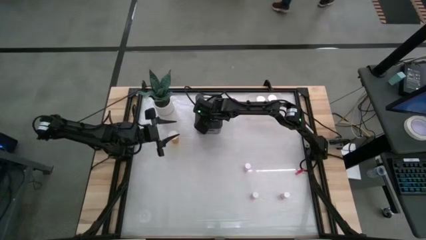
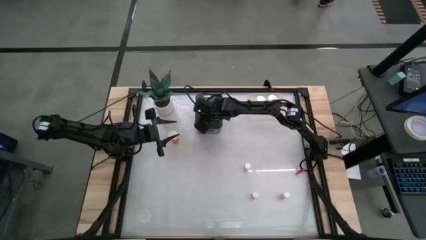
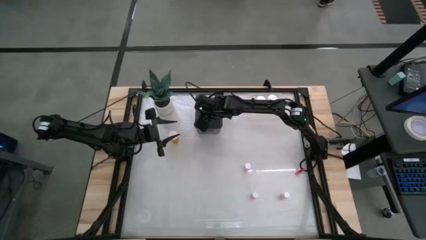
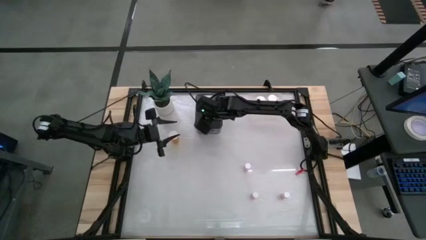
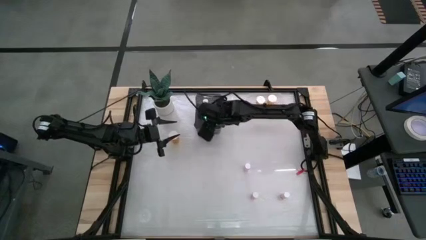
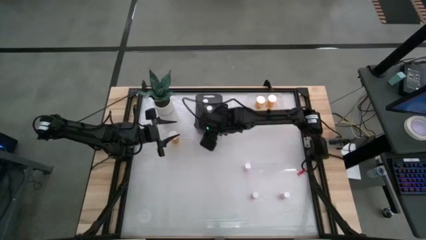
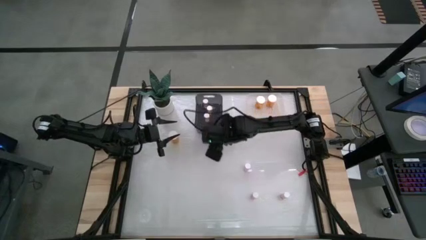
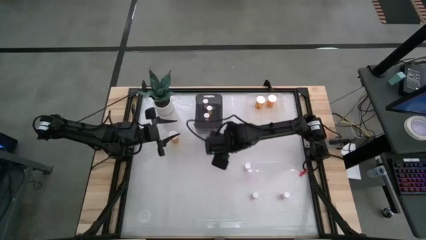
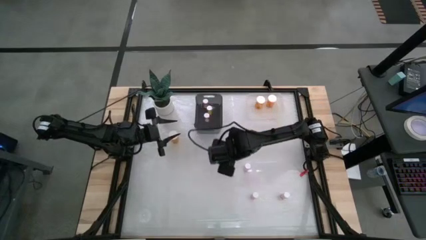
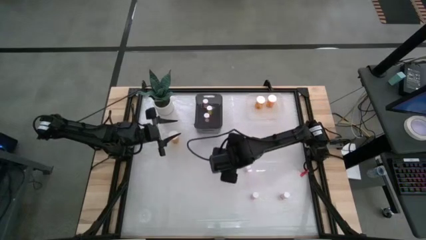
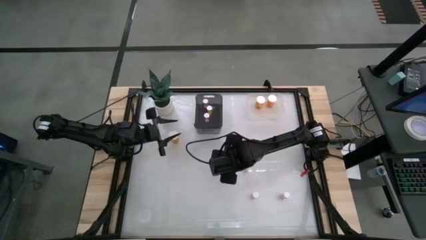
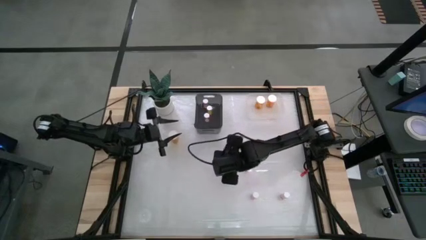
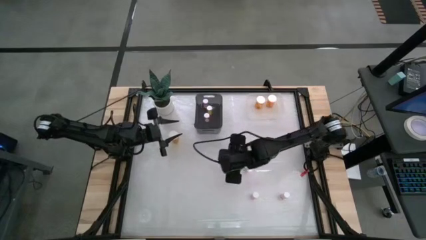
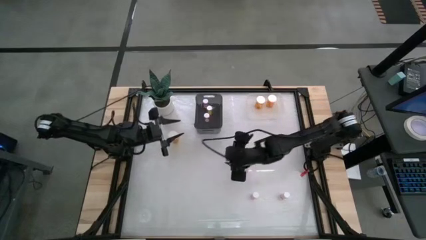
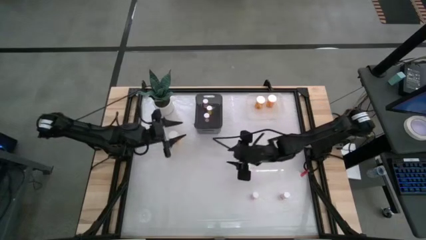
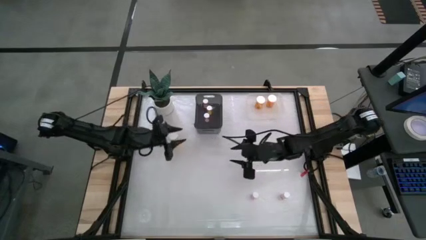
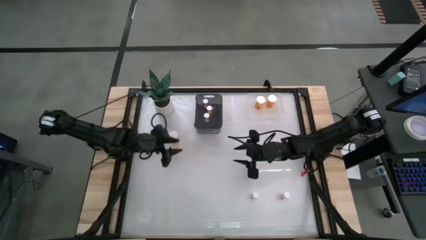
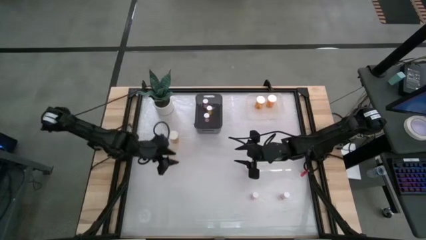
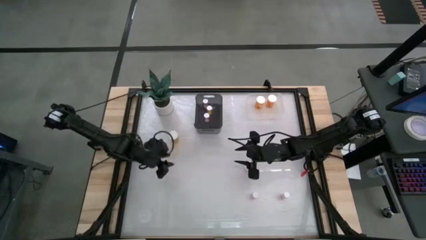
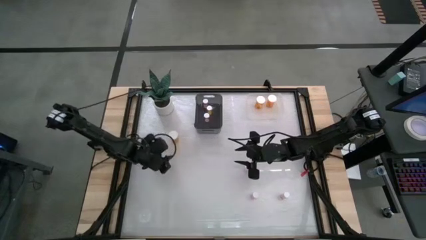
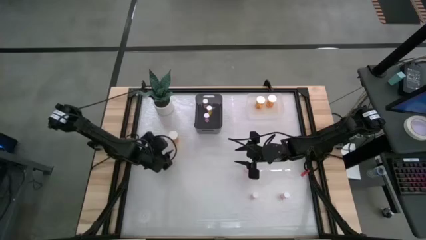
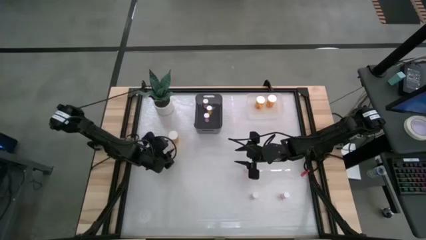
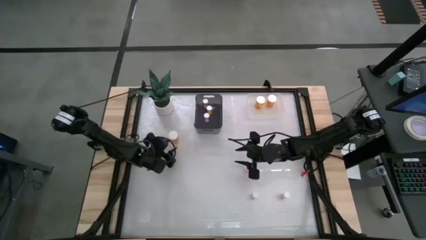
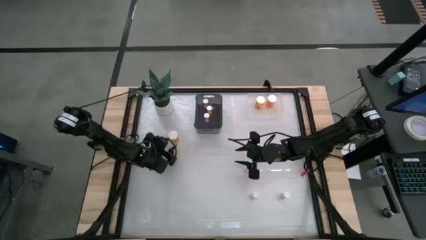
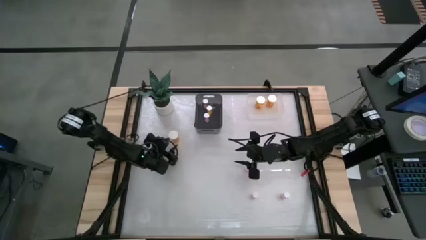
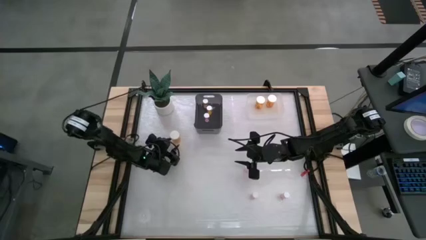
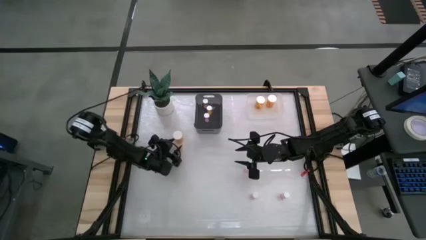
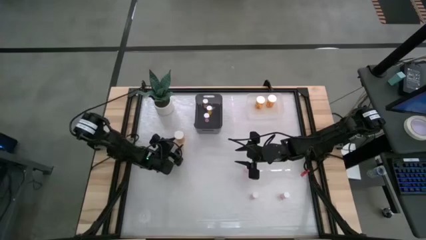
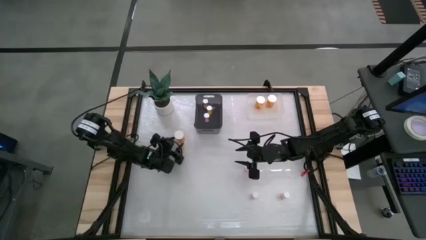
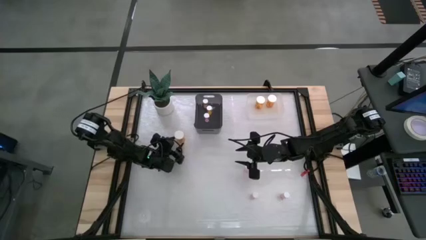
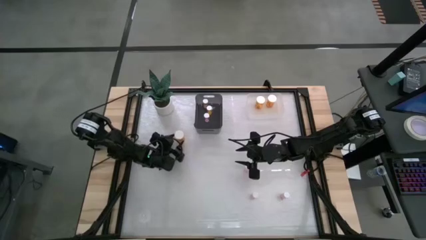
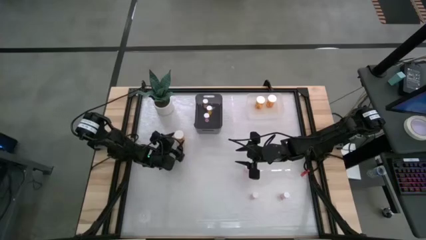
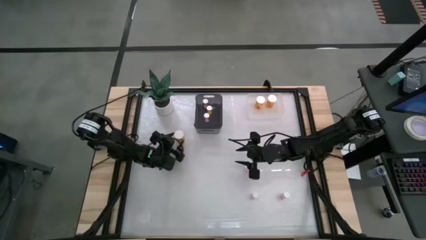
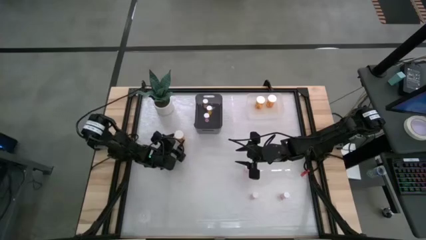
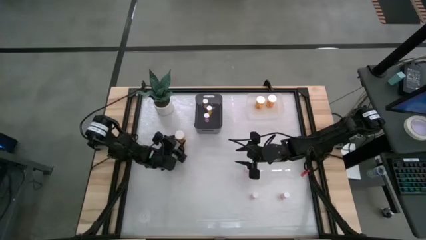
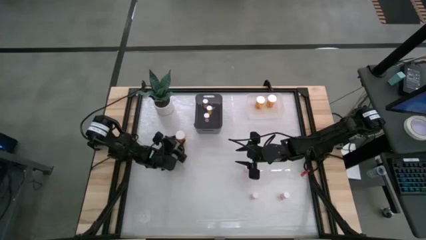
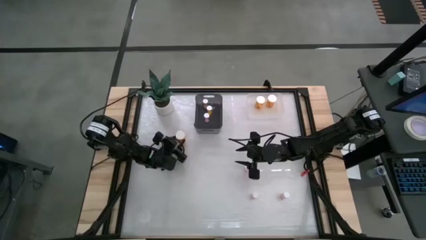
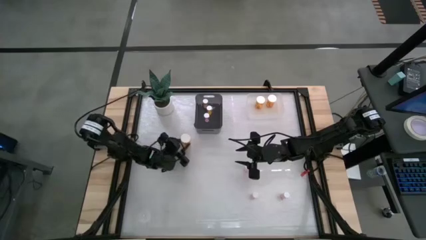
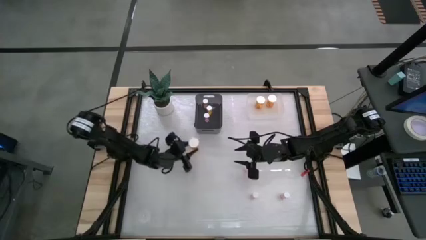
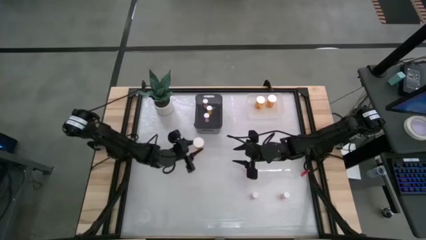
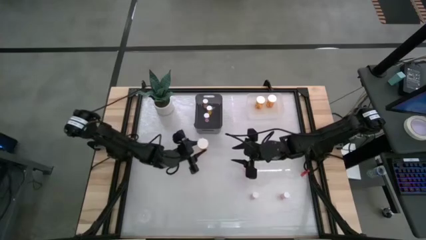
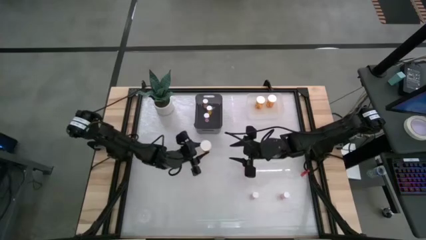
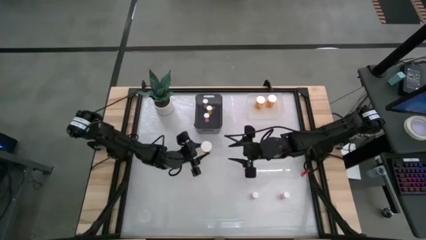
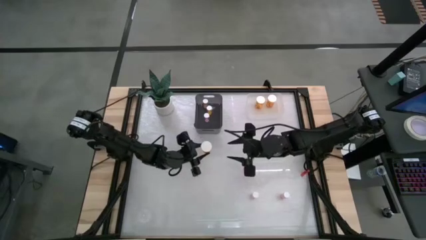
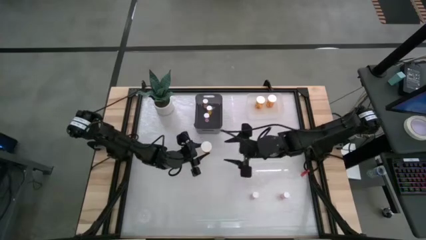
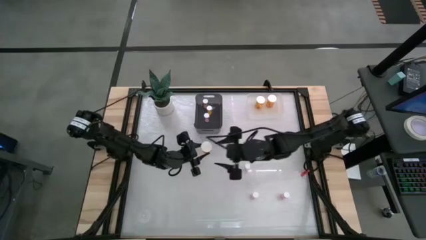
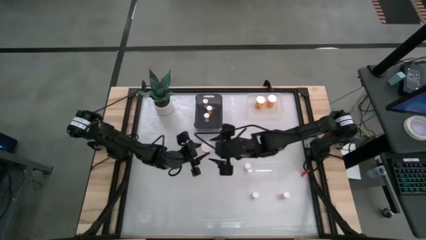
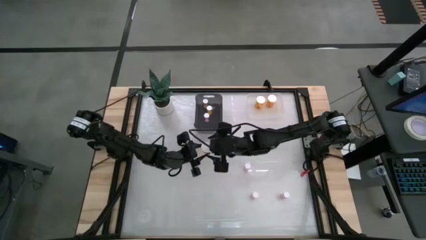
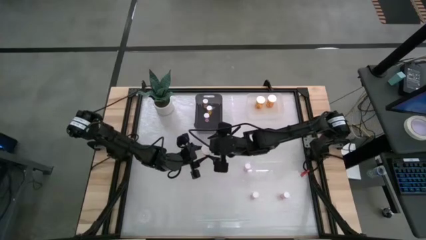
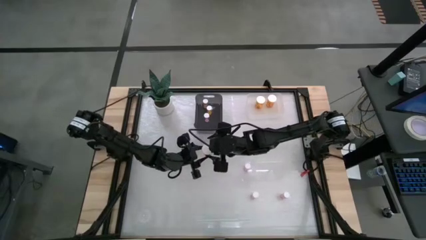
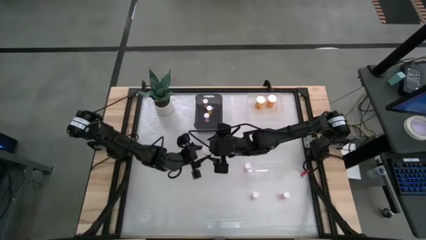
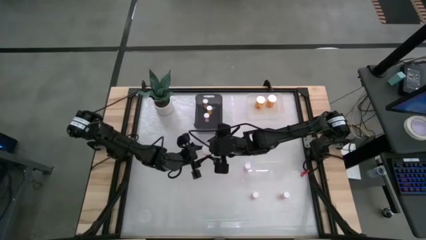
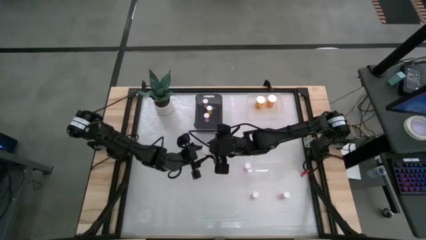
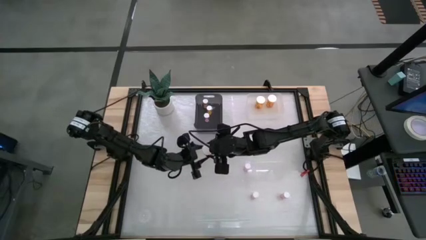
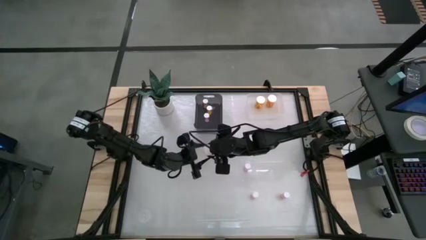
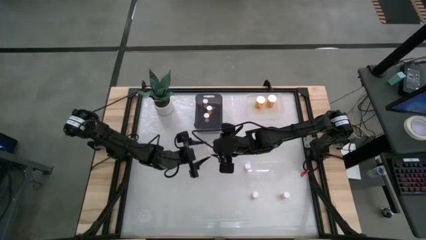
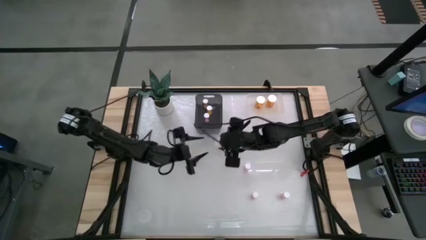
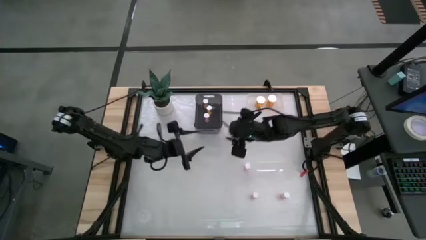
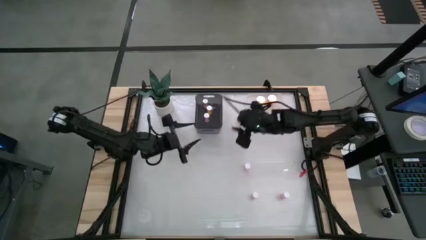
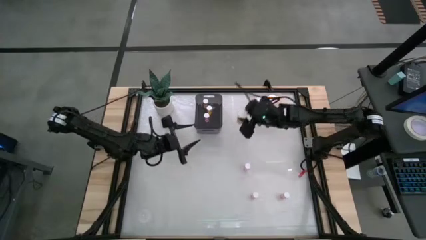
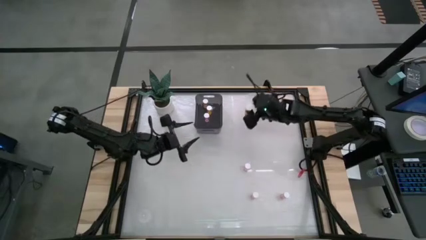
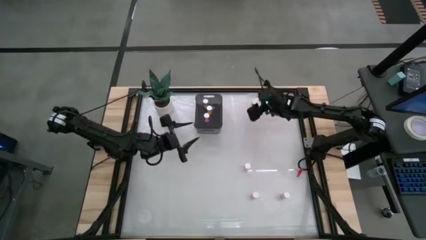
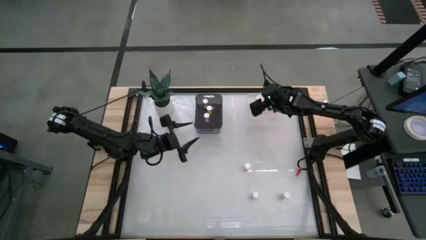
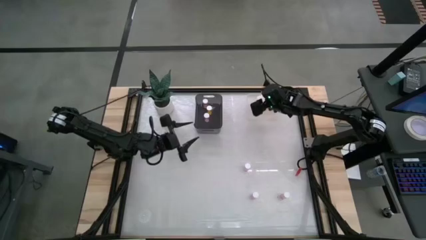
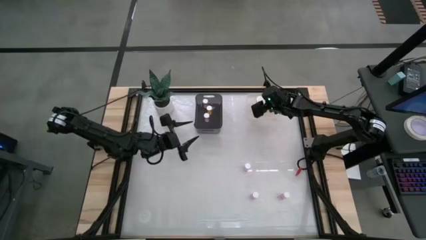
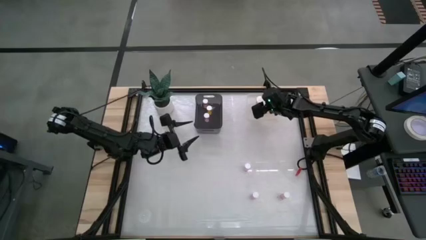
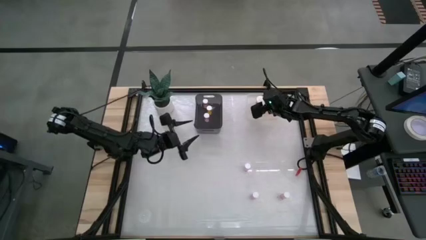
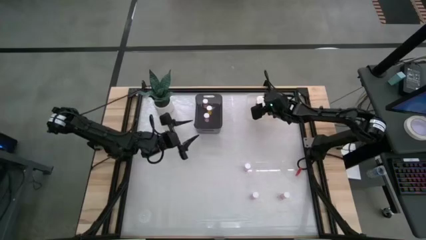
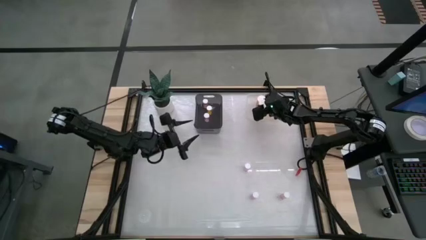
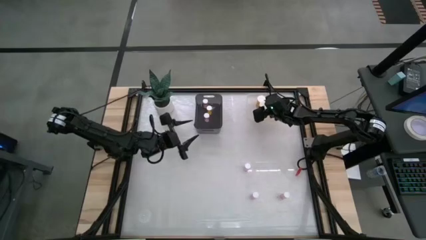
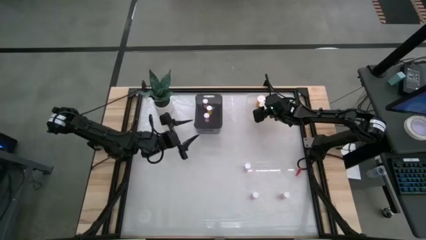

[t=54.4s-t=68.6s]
Task: Pick and place medicine bottles into bin by pill shape (circle, oval)
Put the large orange pill bottle into the transparent bin
